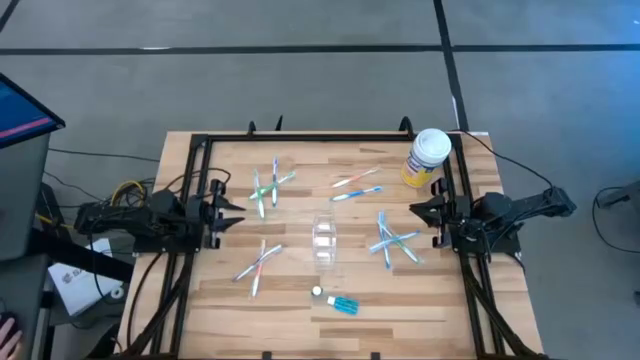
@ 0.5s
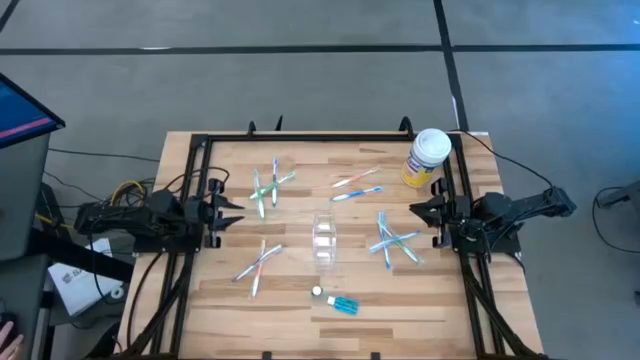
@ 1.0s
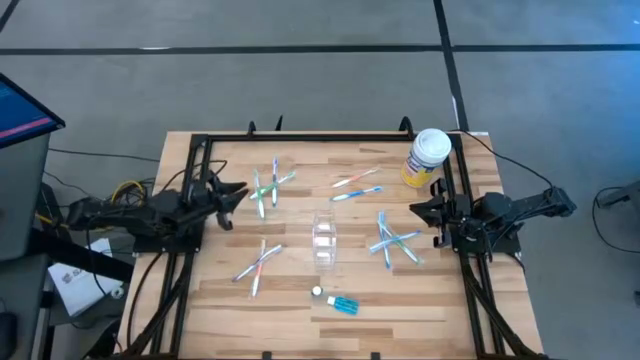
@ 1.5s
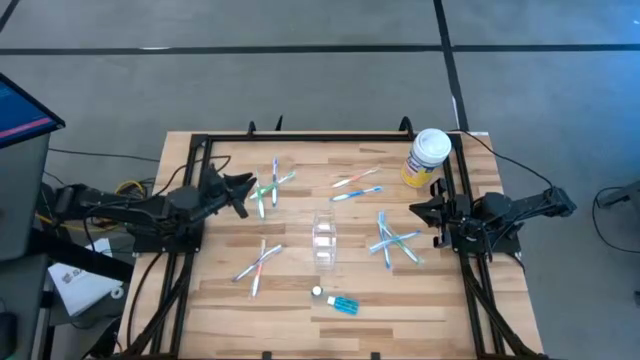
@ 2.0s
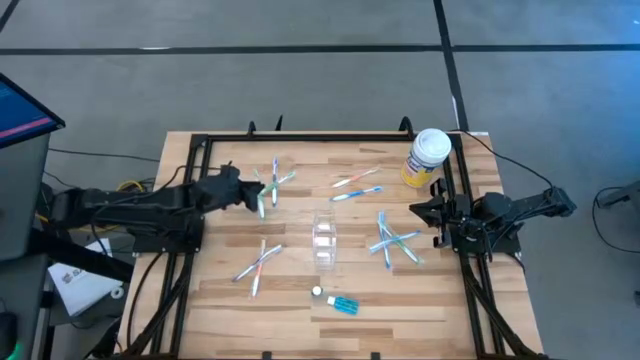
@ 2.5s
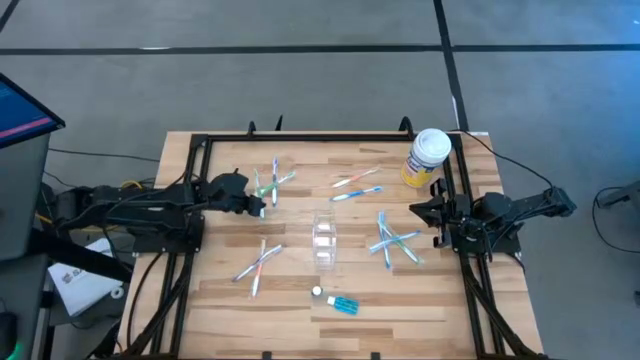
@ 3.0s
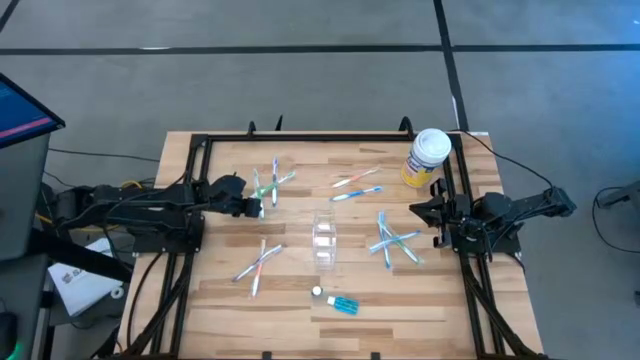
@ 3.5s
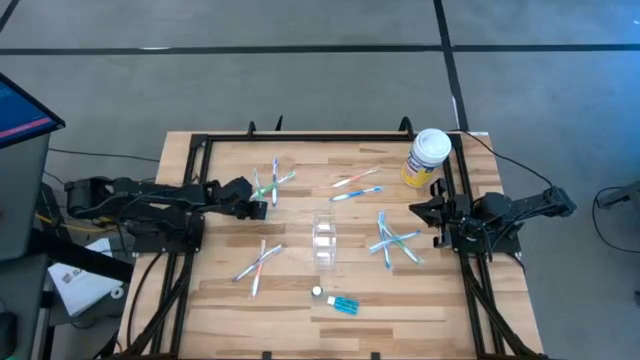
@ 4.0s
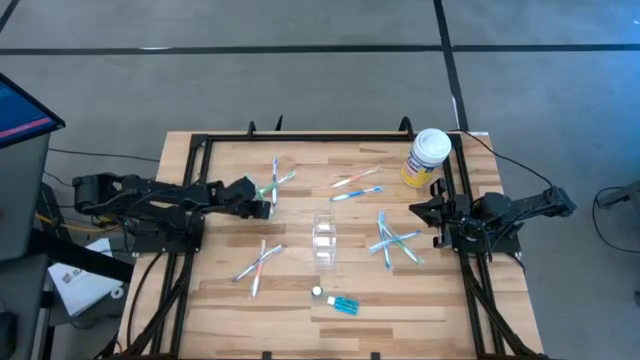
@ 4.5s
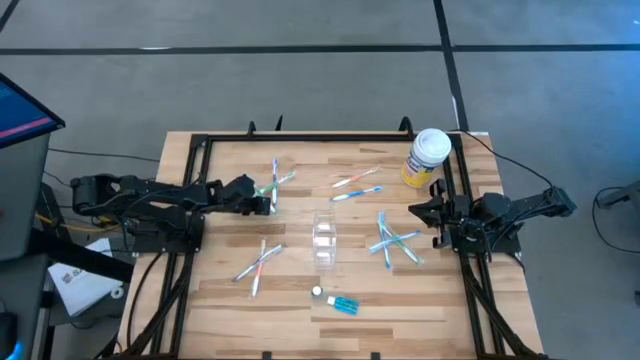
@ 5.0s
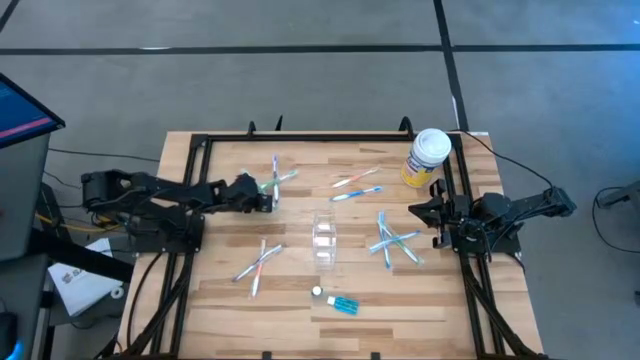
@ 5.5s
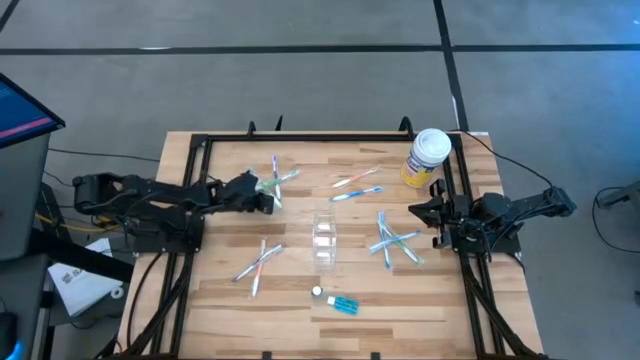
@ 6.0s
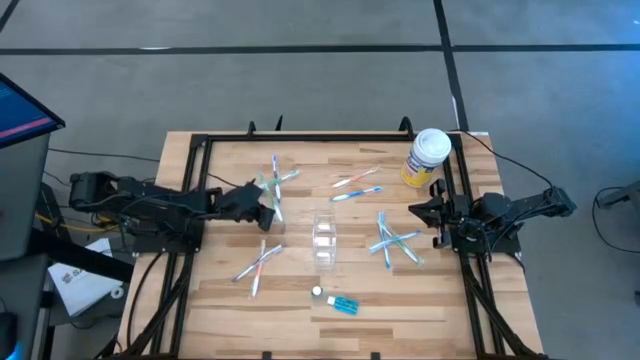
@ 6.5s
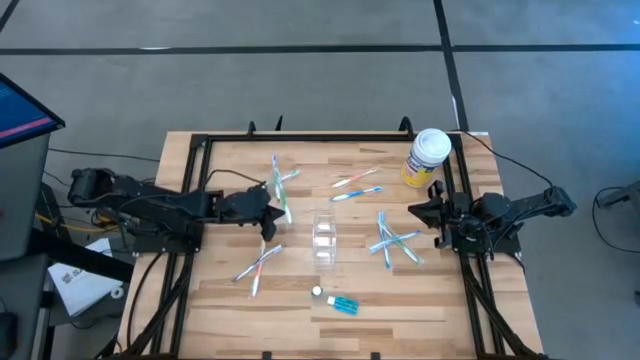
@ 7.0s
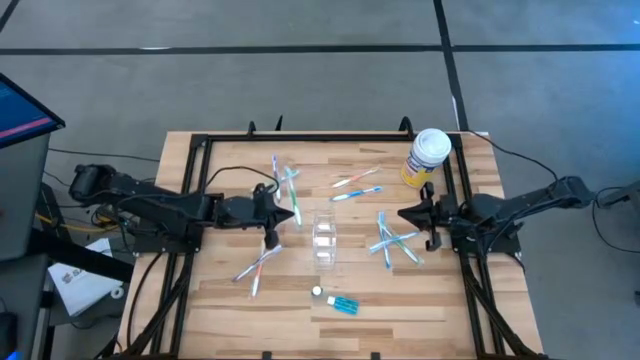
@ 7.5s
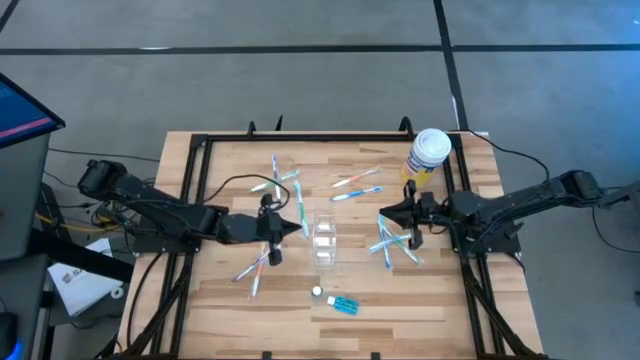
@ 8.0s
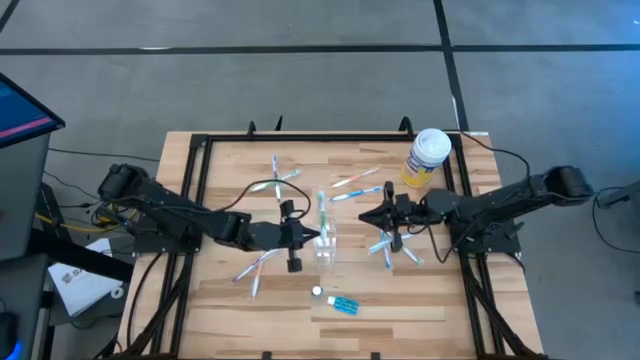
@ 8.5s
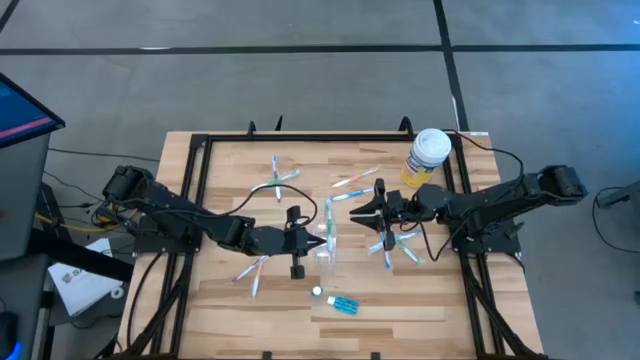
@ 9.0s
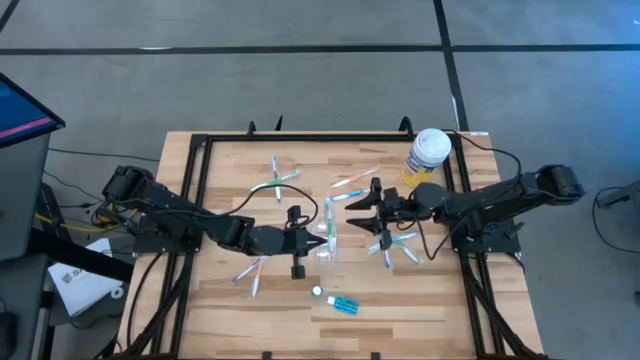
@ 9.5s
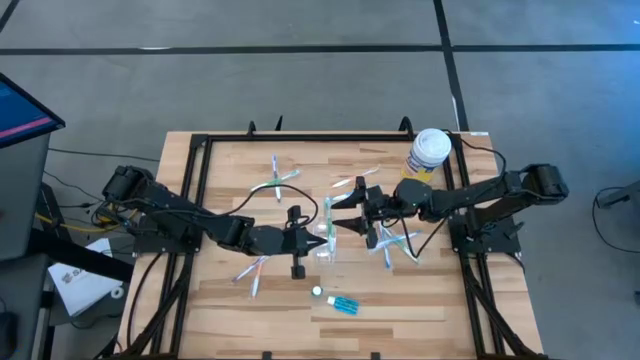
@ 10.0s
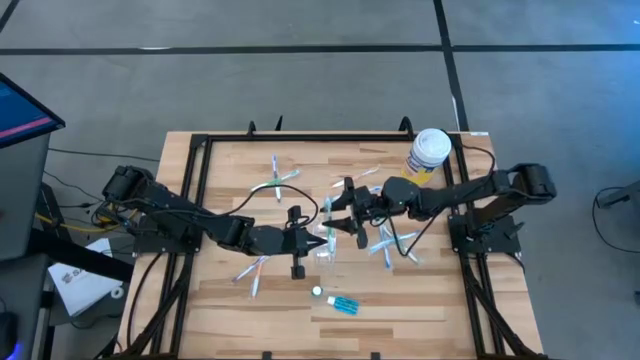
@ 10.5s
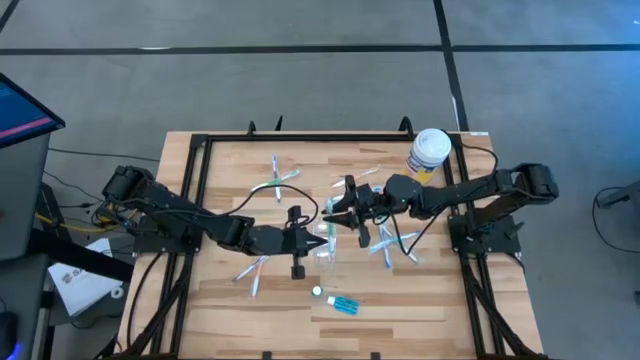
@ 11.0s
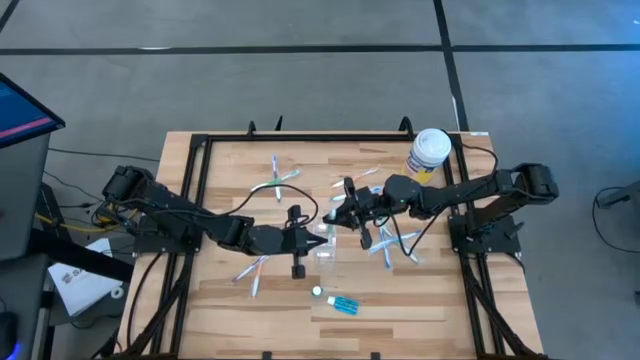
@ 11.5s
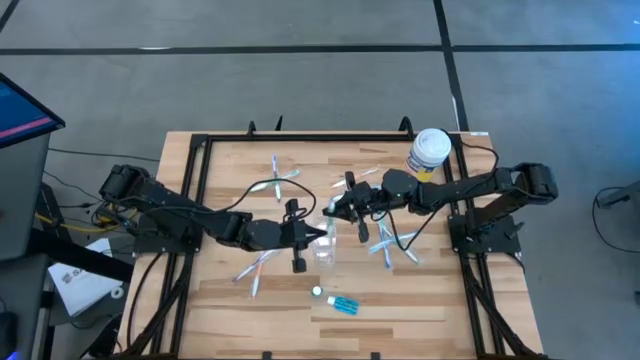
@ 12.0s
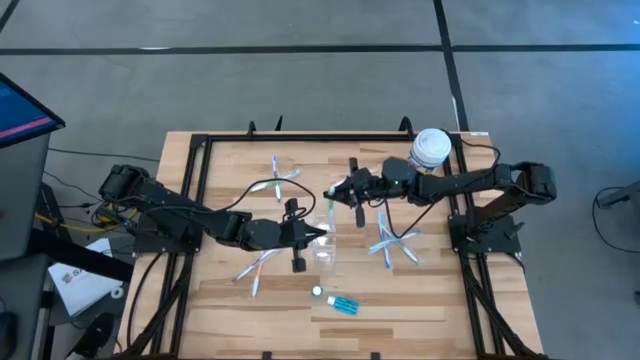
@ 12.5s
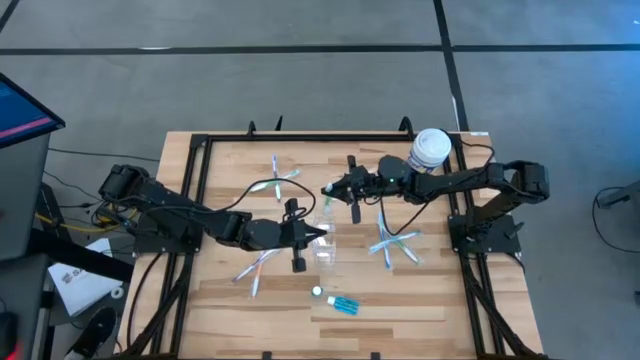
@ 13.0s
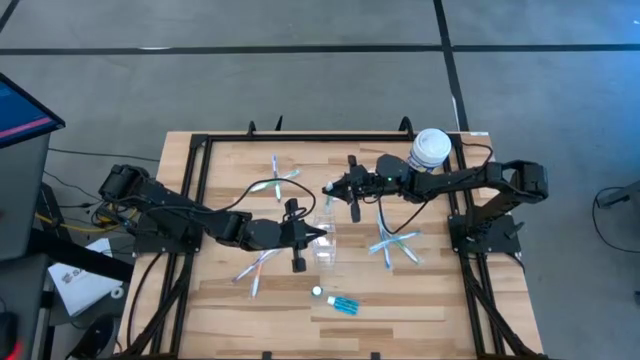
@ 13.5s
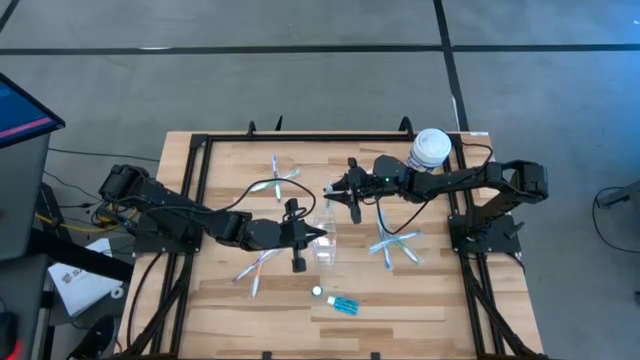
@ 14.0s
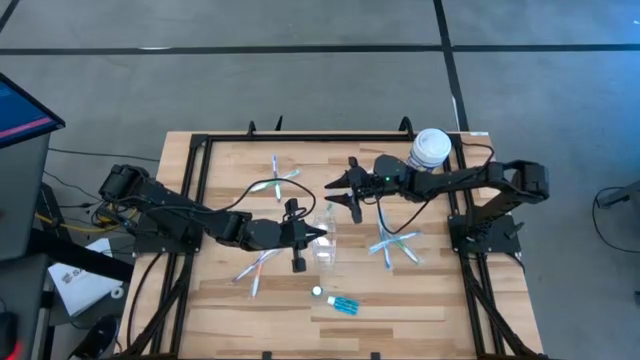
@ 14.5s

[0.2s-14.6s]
Task: Pick & Place toothbrushing station
Put the top left green toothbrush into the transparent organizer
